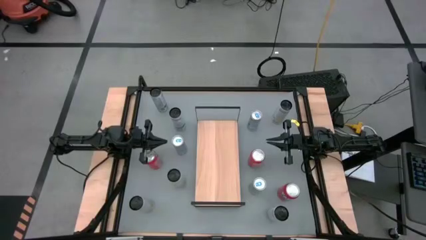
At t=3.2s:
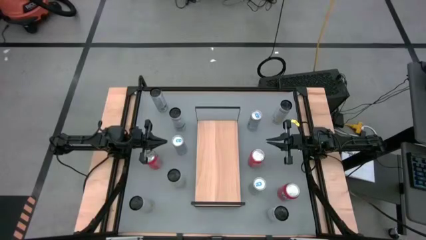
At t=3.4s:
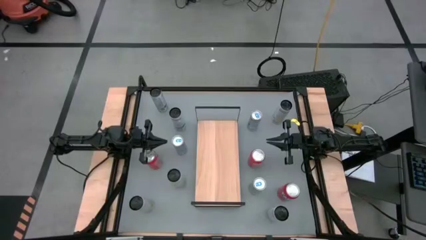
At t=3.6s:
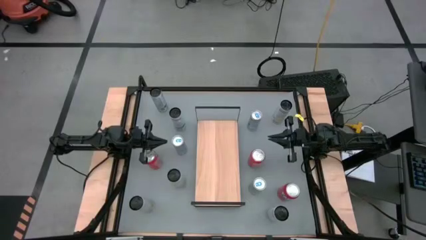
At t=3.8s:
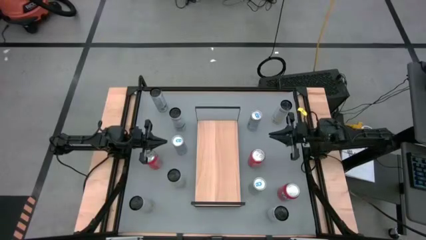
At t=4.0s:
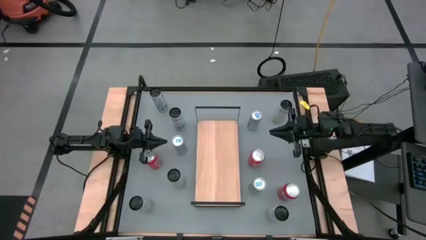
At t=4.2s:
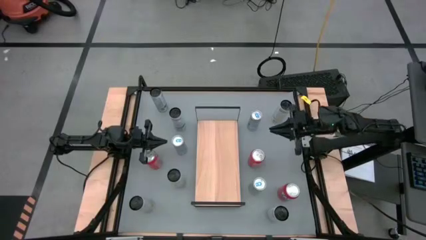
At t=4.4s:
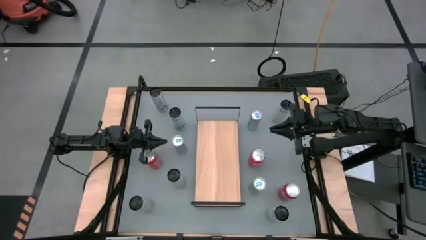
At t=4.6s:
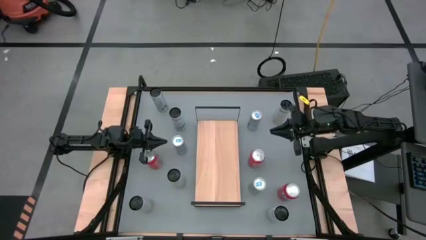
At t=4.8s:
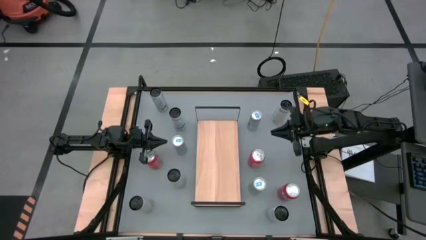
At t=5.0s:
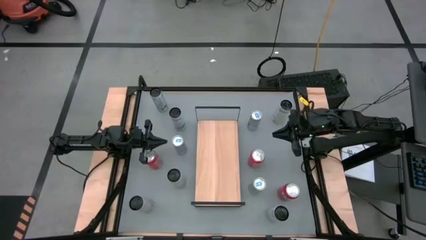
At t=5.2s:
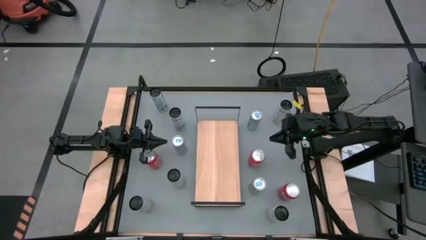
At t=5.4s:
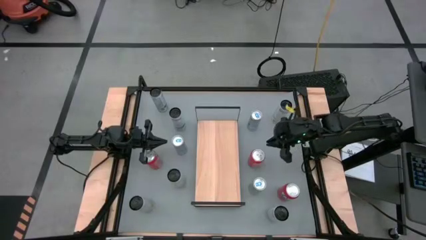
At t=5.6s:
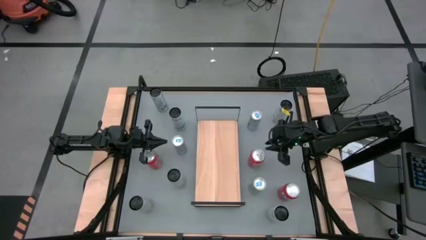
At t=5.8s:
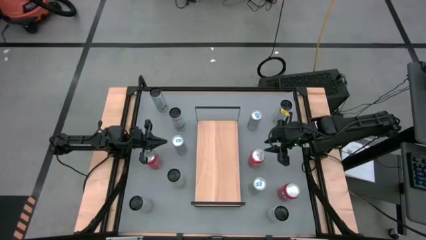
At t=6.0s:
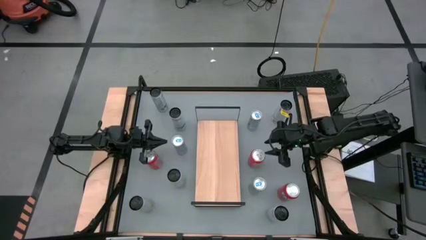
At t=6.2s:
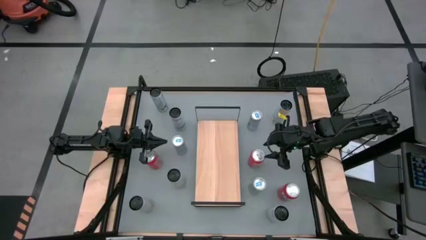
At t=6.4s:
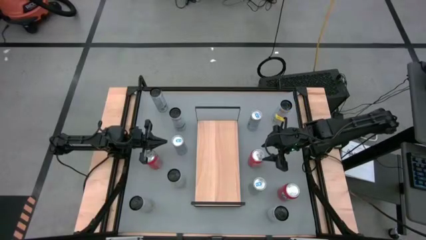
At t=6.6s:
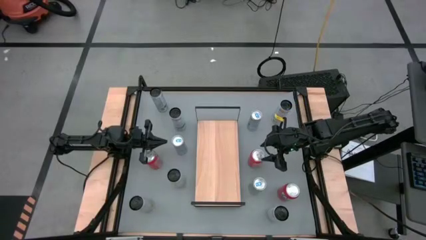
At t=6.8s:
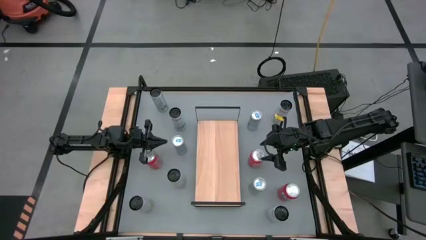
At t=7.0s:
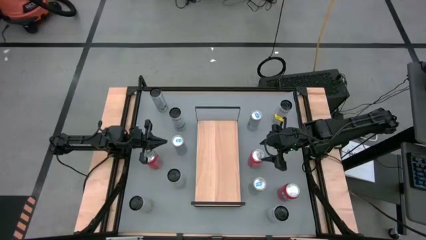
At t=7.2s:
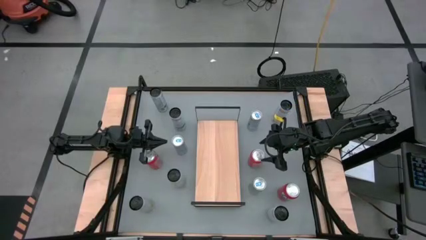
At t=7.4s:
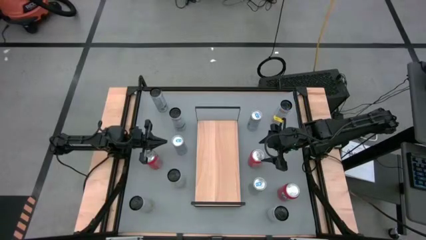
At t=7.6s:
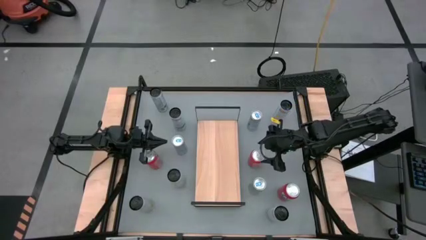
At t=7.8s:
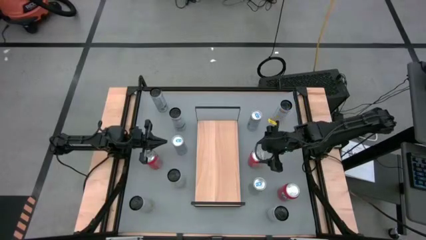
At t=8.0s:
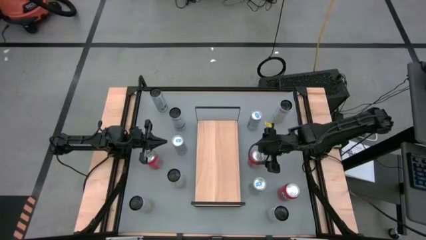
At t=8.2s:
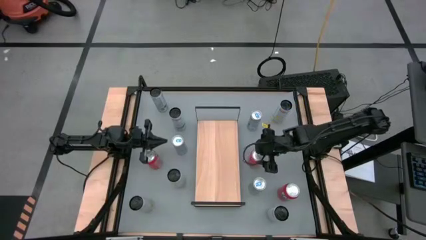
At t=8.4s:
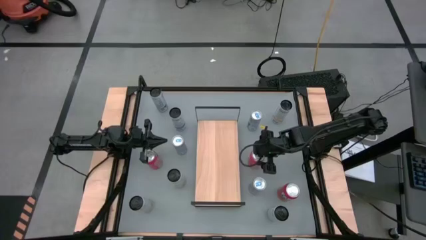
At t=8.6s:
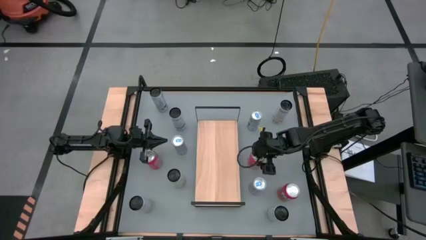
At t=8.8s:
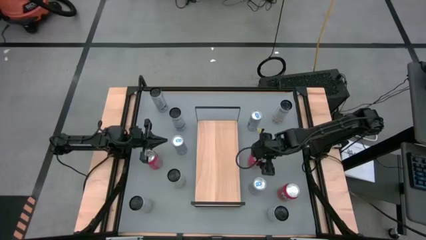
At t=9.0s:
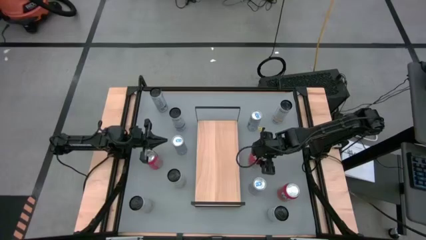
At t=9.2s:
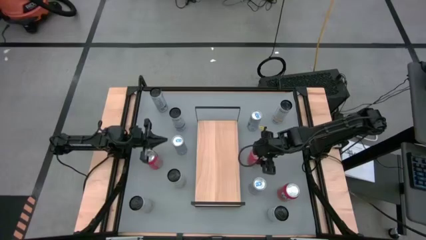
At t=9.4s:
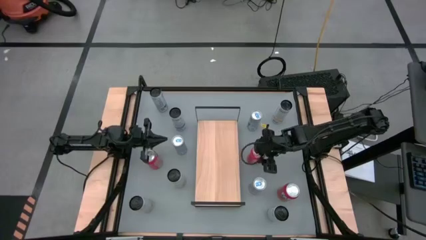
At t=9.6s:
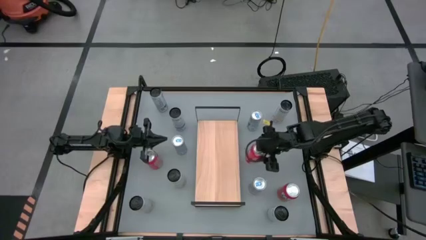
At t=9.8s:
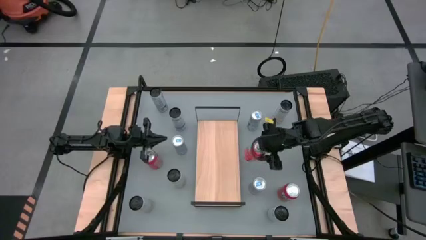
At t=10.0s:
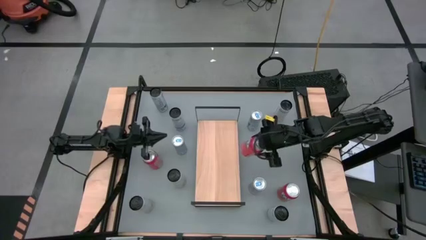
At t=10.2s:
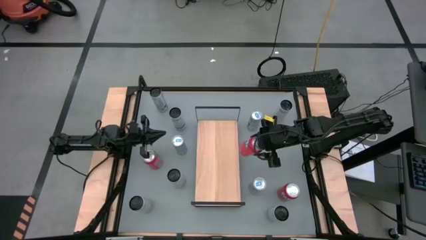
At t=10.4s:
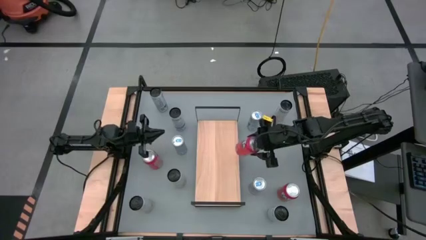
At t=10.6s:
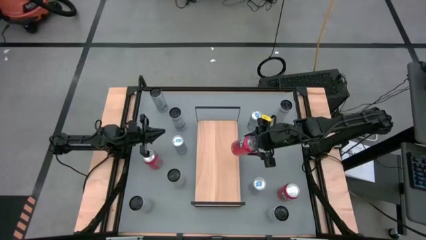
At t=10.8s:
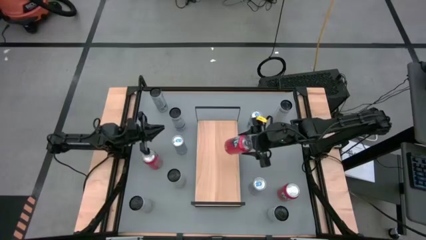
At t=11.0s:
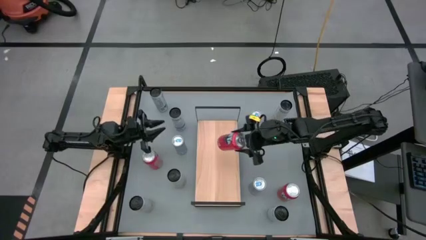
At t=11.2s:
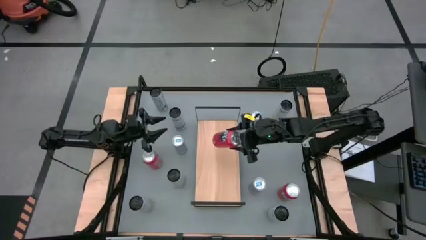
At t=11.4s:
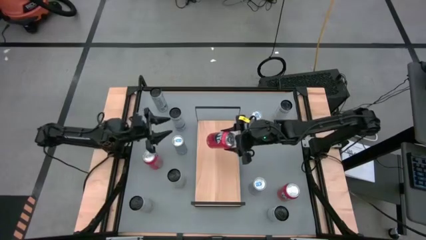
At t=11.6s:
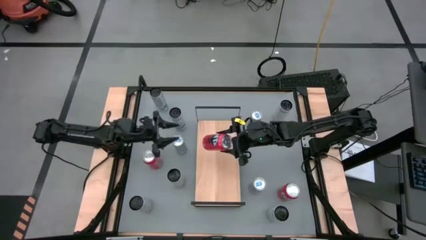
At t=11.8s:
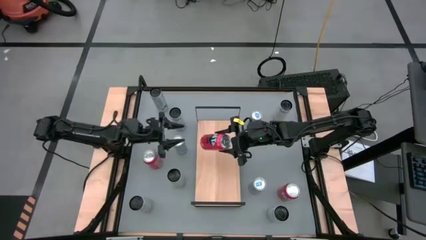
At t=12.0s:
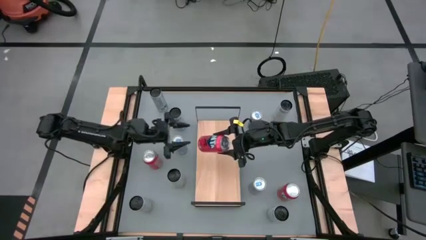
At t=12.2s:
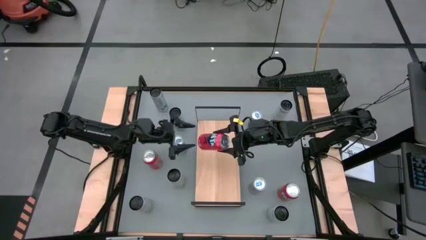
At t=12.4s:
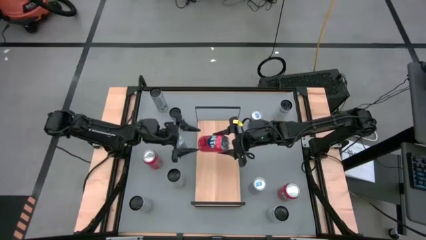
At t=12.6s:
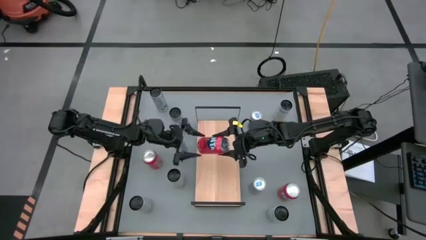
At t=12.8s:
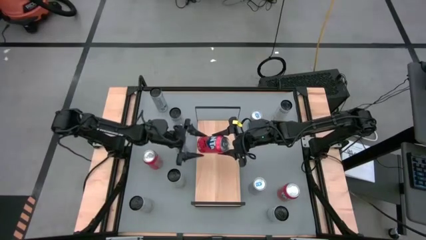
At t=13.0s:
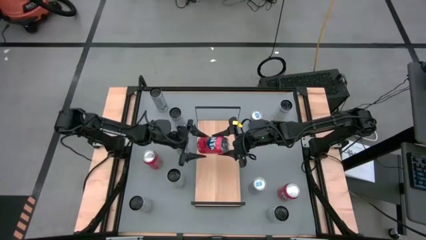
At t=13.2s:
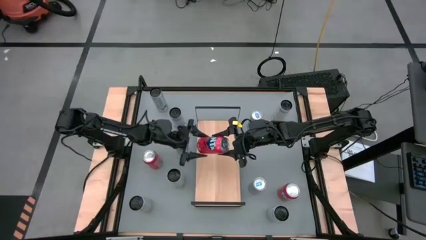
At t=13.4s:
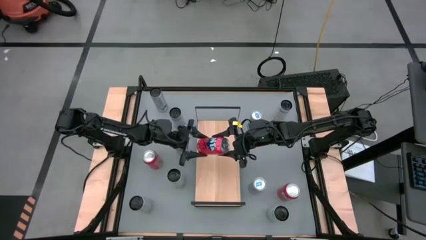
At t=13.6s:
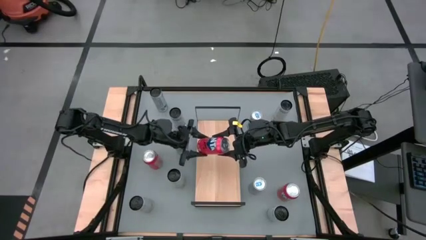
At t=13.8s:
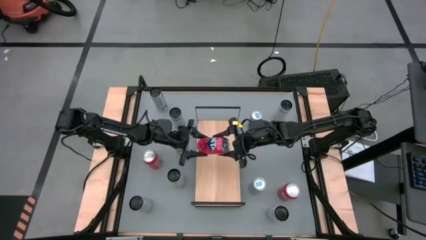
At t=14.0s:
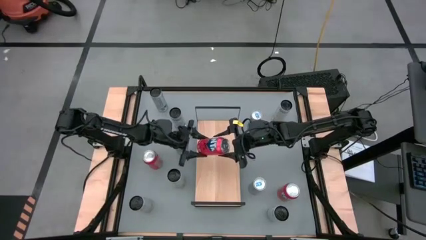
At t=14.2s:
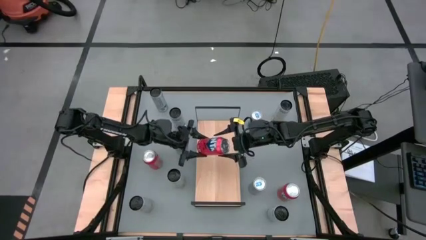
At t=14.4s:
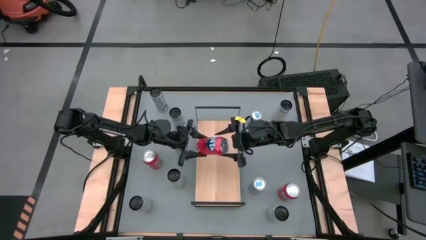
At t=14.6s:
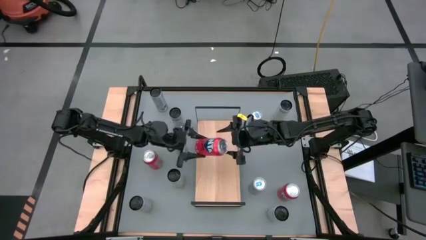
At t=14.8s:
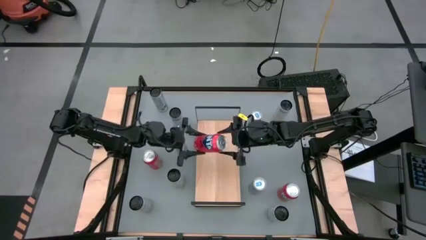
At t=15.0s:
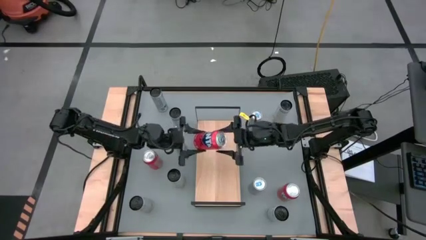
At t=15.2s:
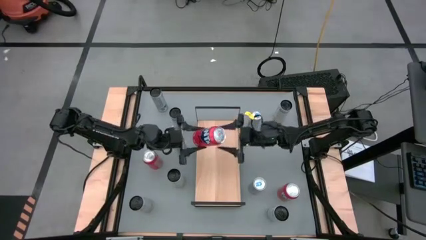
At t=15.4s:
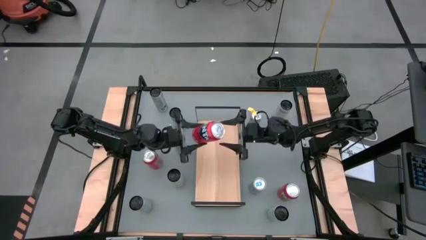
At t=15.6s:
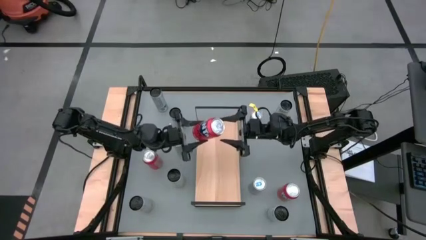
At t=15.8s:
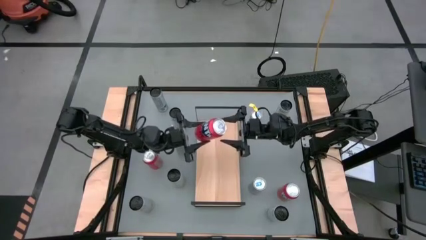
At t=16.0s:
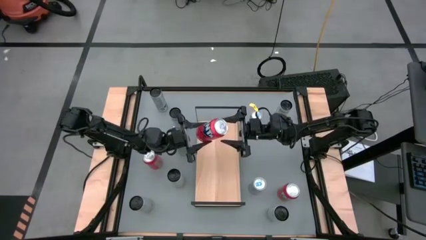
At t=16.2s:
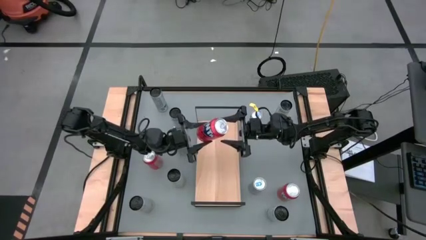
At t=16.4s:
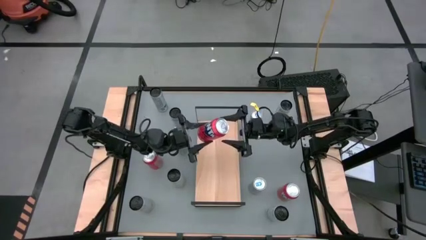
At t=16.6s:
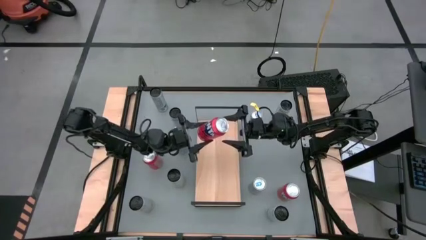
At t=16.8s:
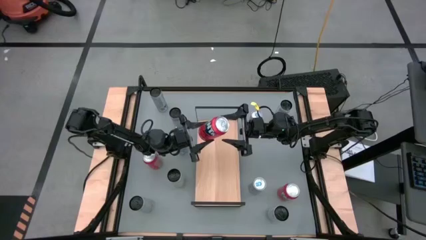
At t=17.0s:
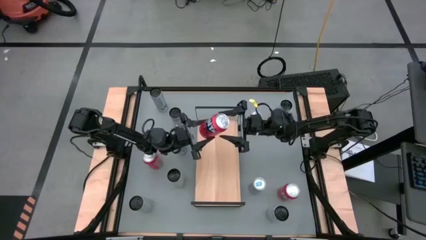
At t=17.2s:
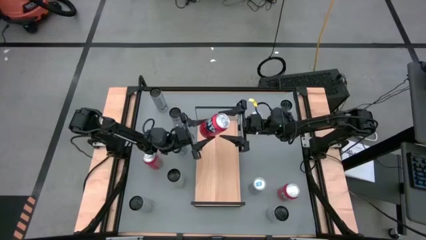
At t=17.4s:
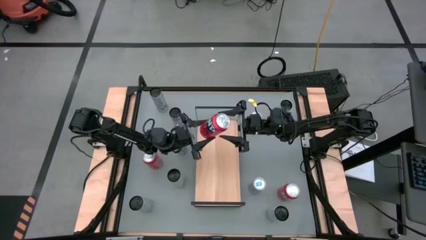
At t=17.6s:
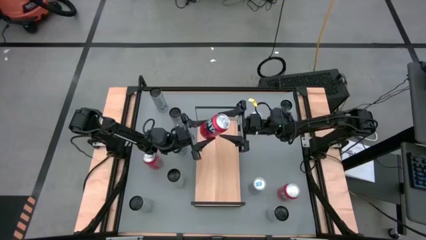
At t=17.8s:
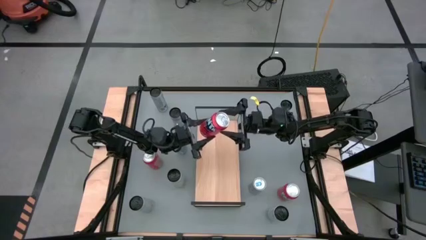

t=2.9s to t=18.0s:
Task: Place canned beverage on shelf
Put the right red soda can on the shelf
